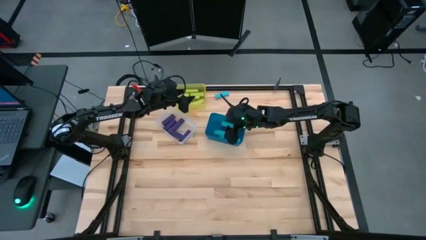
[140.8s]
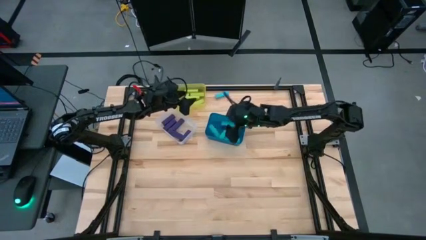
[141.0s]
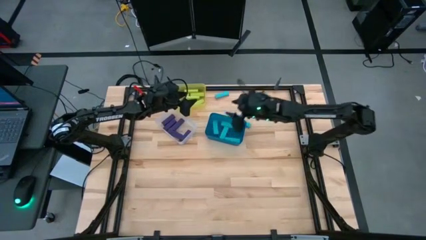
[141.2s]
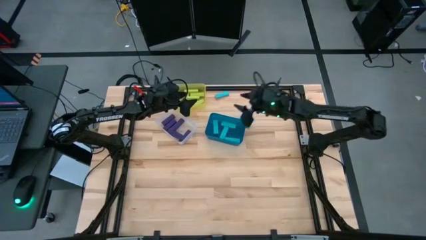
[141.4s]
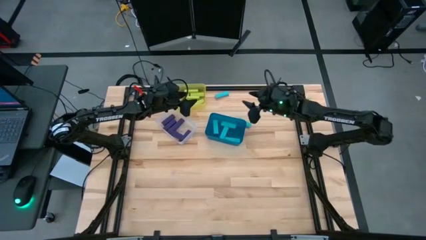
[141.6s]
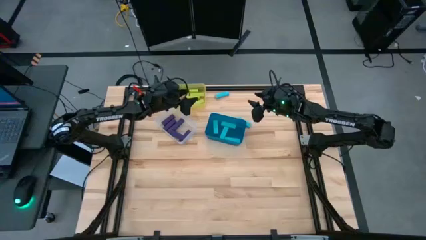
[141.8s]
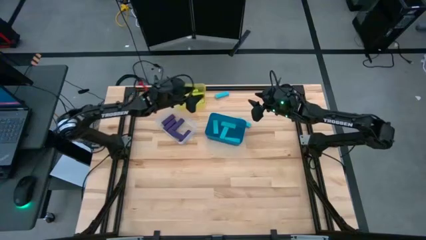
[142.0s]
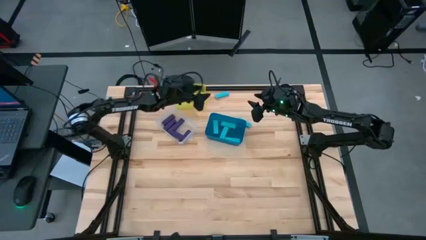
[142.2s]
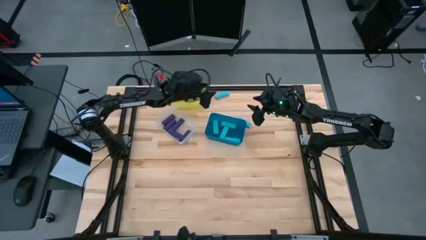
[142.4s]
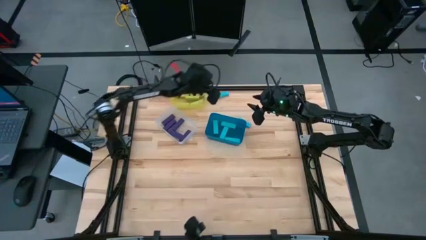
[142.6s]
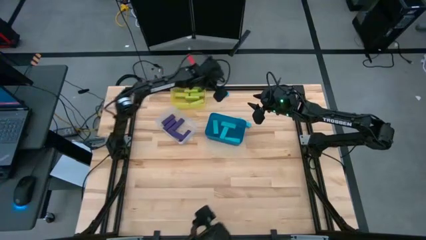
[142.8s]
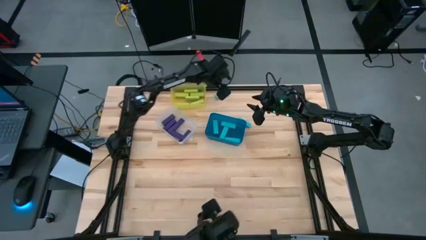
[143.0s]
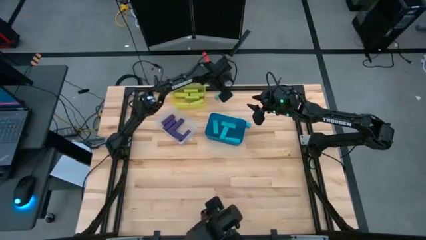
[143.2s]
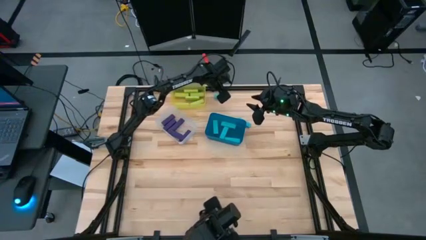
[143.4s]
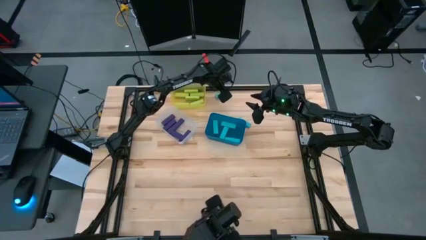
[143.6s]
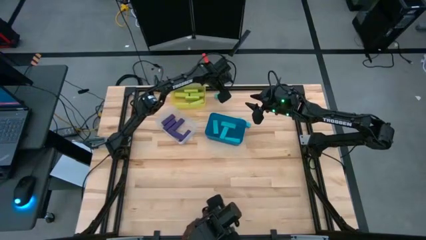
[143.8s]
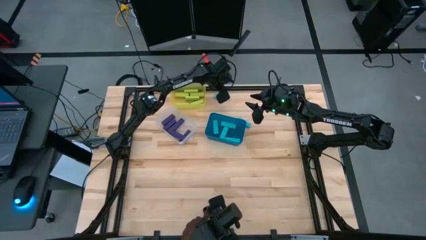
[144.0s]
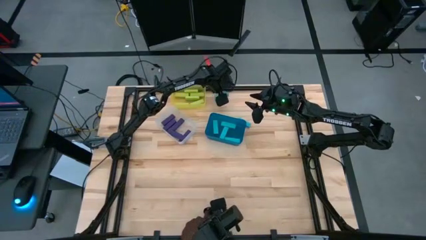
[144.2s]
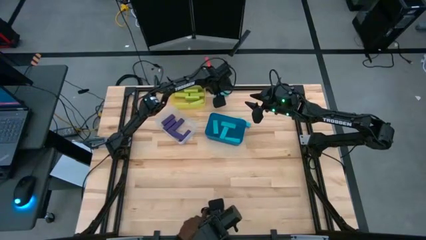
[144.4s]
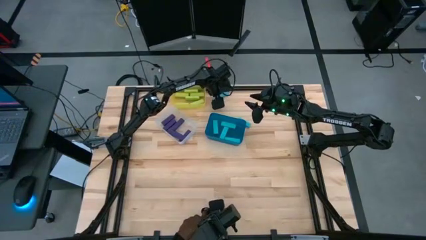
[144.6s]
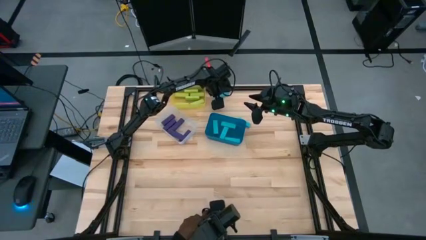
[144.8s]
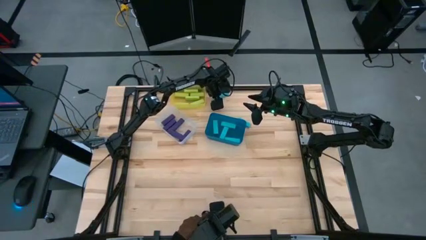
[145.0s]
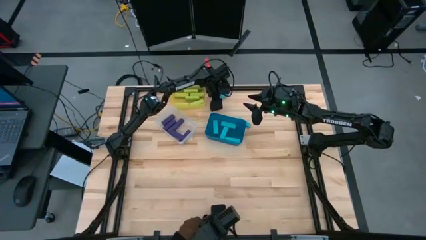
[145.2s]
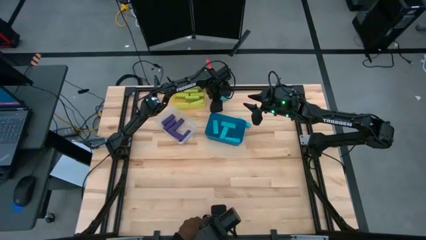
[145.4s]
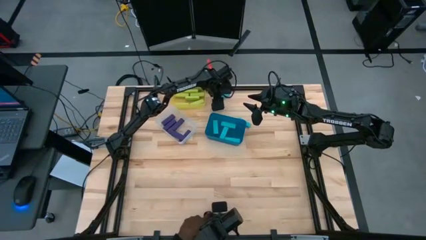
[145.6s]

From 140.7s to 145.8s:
Task: Sort blocks
Put the blue block into the blue bin

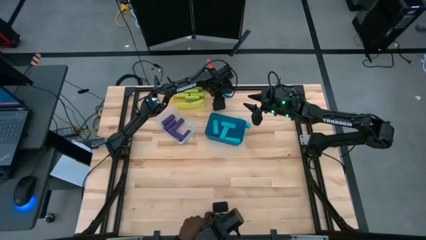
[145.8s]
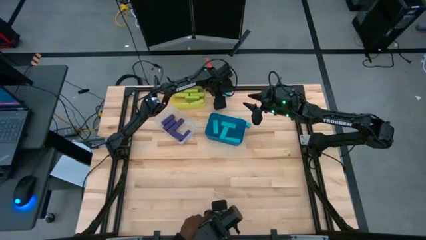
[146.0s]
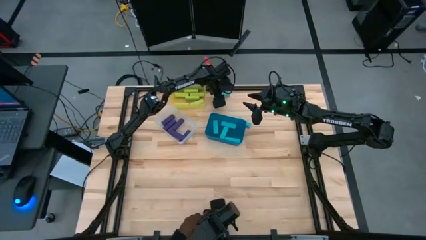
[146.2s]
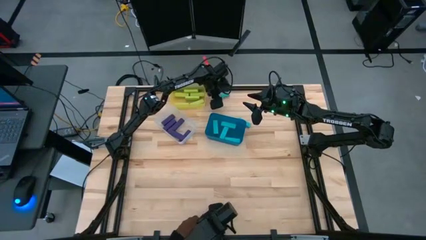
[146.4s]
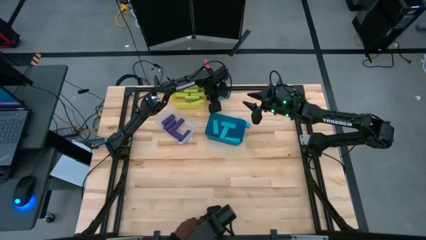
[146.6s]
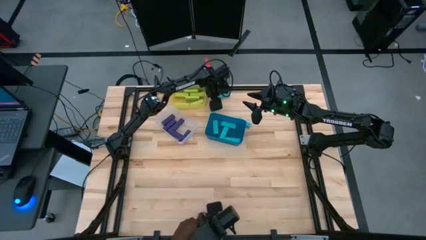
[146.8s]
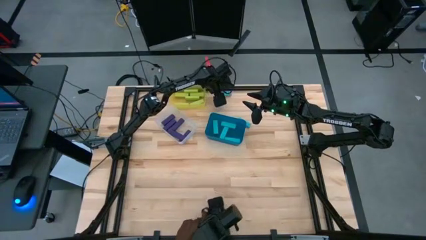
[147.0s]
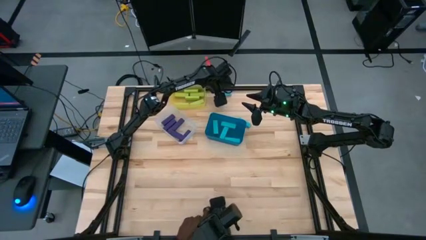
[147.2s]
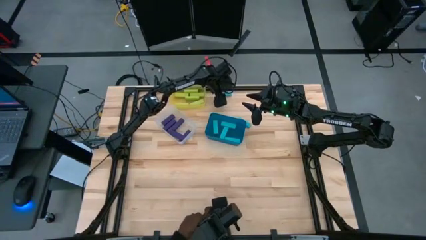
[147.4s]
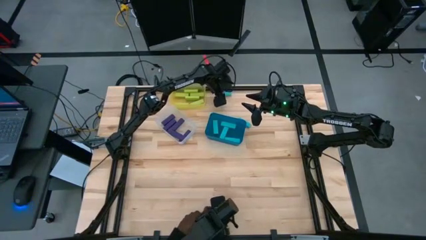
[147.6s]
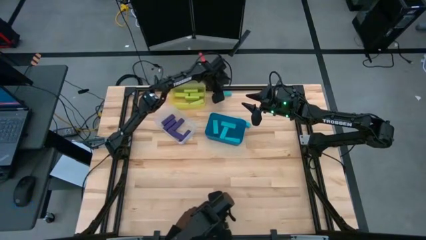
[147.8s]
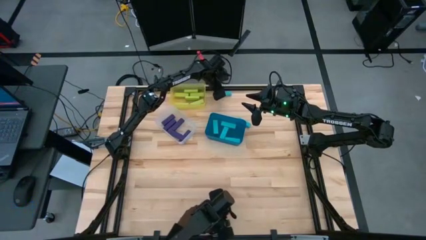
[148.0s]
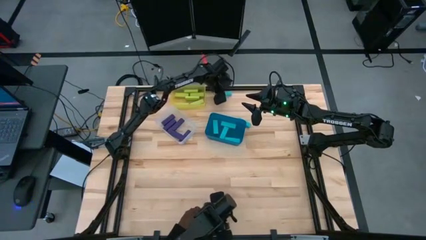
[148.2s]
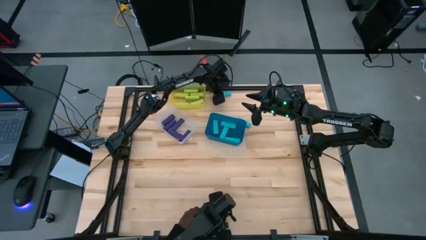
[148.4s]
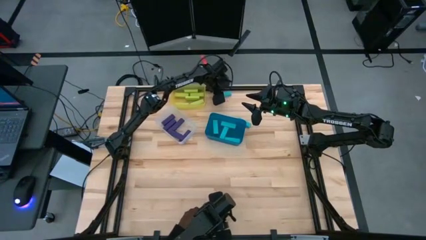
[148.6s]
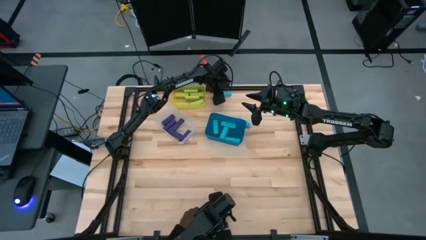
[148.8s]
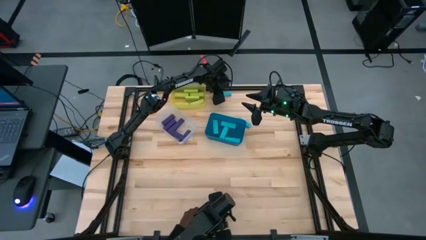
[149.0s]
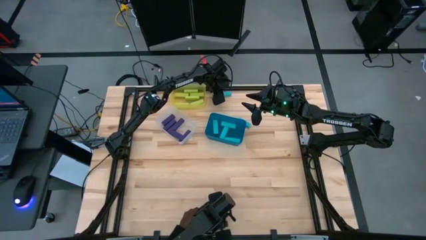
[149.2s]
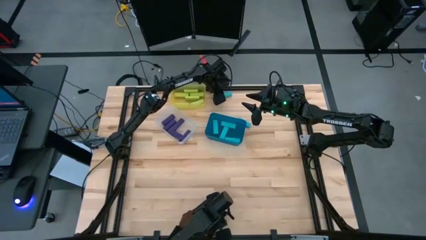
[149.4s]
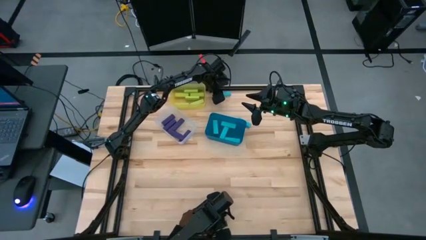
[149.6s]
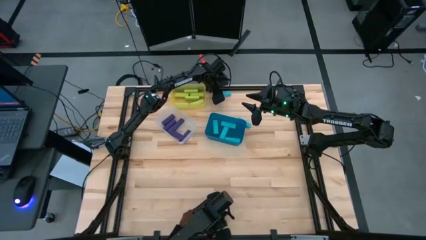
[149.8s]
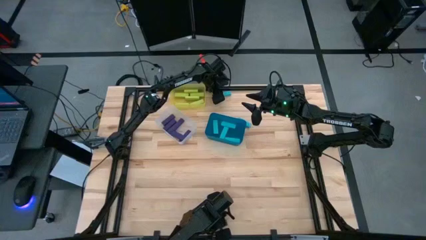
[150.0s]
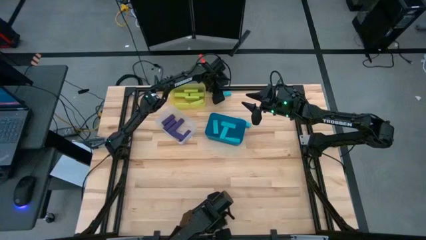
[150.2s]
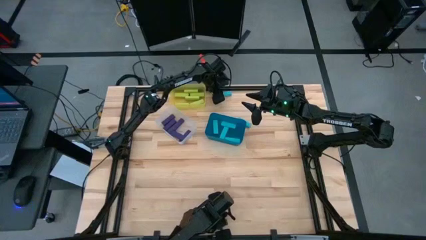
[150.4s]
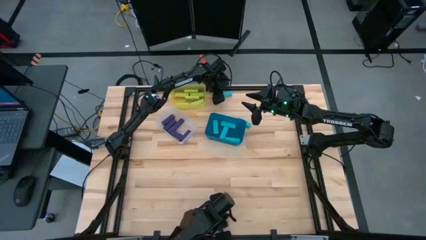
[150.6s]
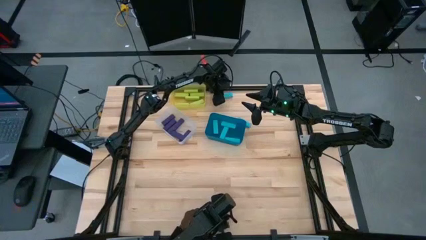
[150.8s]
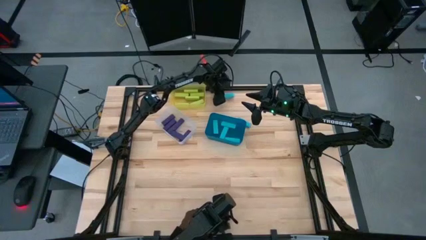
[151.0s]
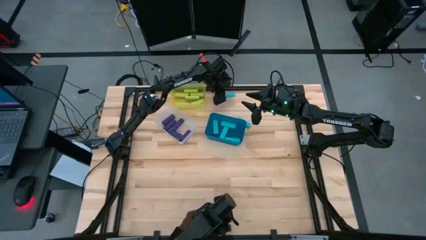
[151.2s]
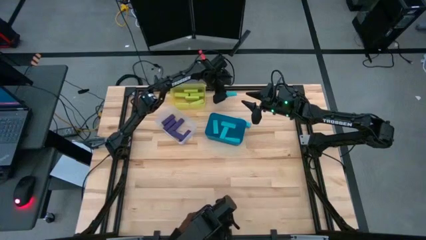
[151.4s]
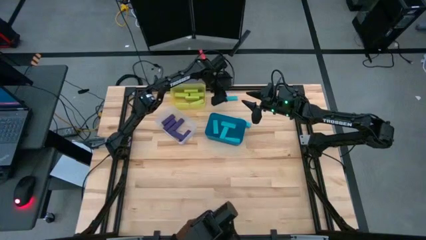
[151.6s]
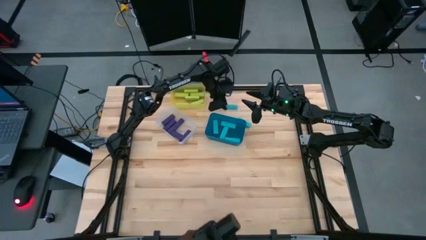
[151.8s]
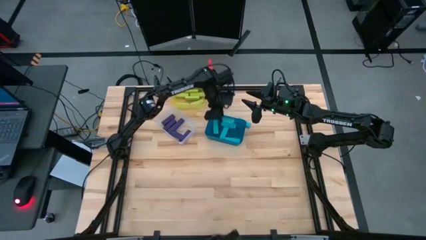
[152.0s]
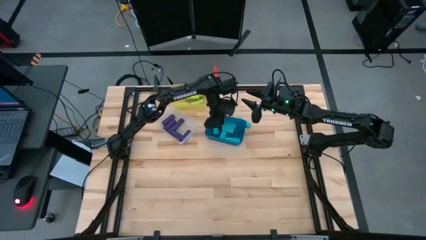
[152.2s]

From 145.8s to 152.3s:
Put the blue block into the blue bin

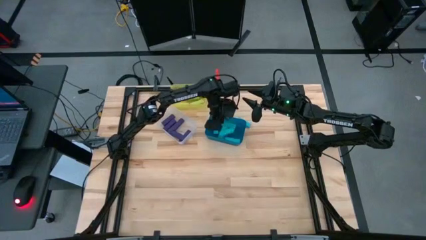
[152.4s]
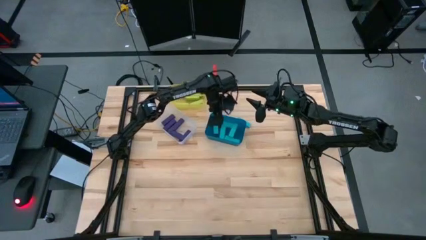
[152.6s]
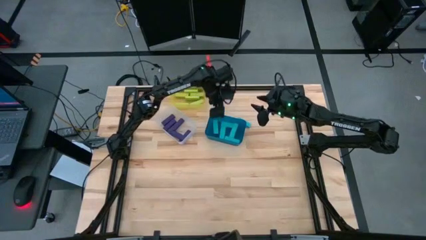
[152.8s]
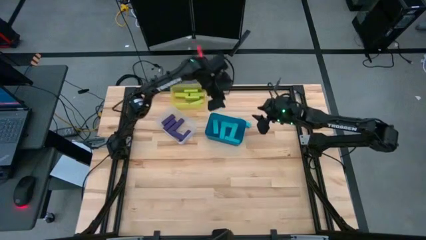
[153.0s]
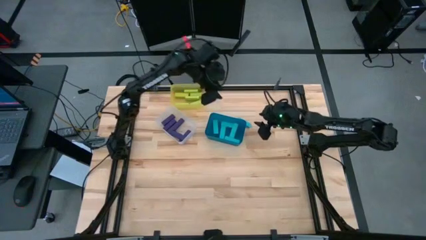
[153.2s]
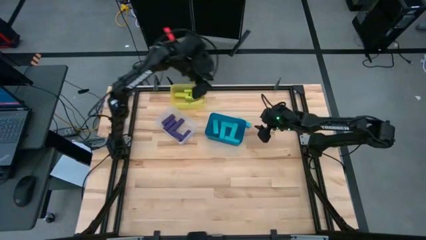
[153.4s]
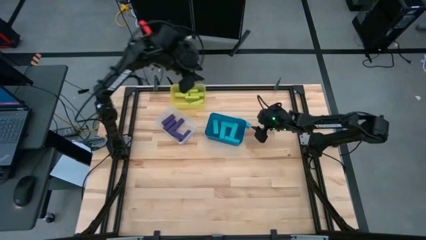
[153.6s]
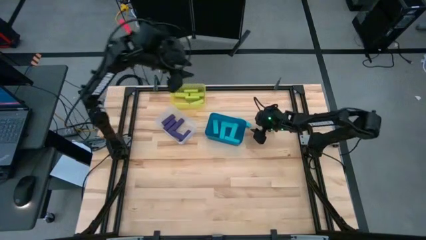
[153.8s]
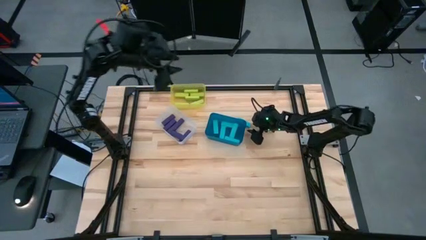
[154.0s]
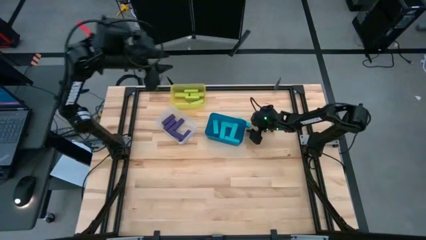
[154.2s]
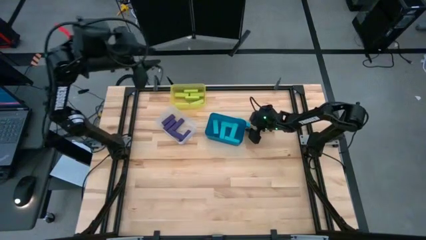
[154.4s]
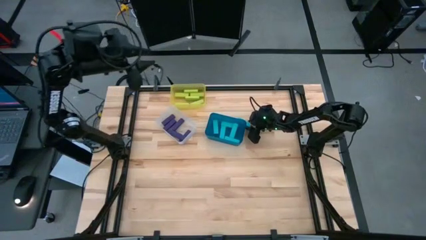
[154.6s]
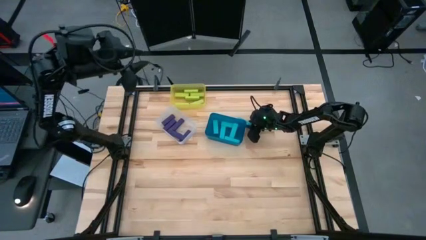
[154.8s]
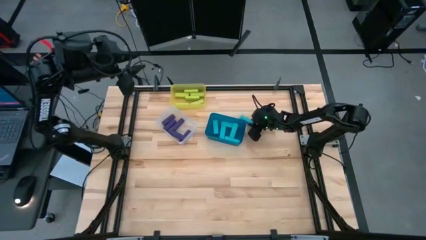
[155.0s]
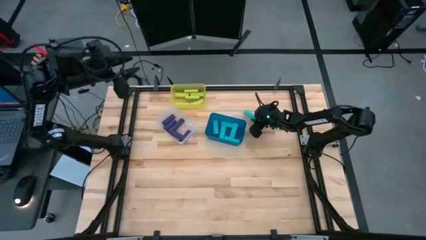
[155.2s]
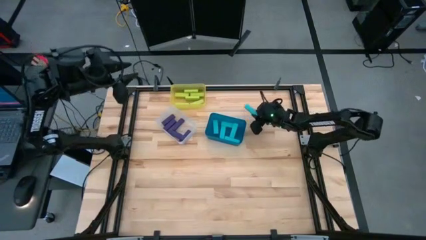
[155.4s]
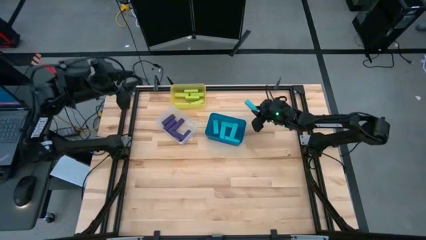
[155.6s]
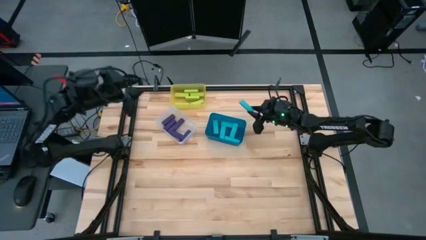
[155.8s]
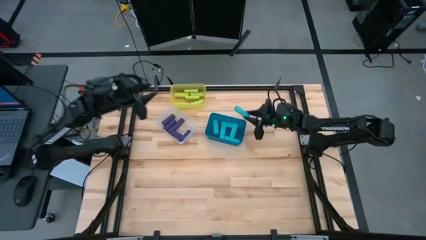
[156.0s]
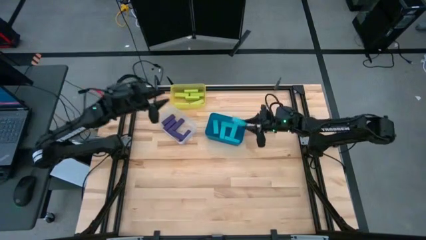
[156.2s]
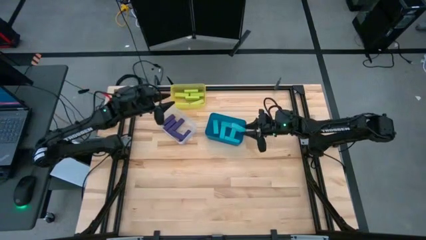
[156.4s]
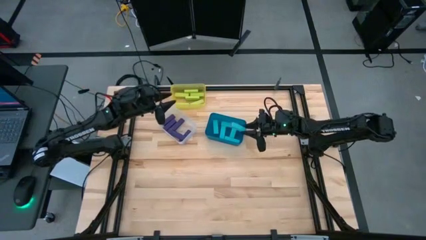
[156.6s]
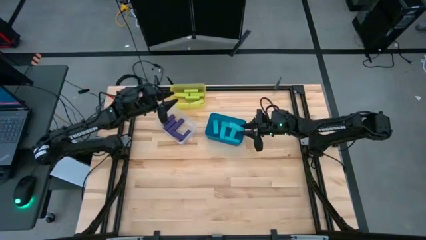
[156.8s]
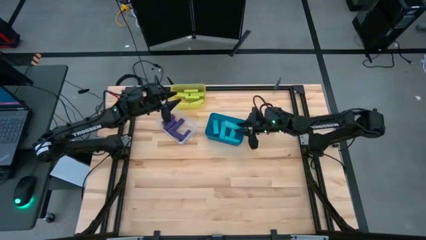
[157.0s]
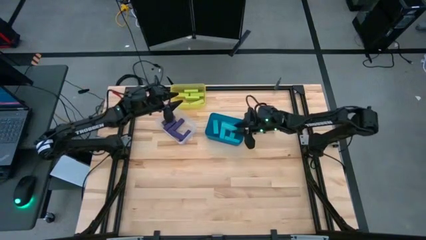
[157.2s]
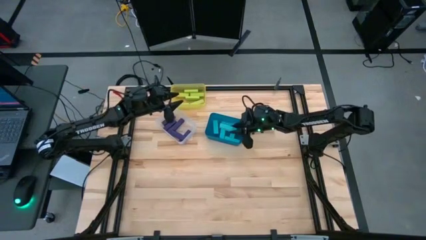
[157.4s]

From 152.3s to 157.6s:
Put the blue block into the blue bin
